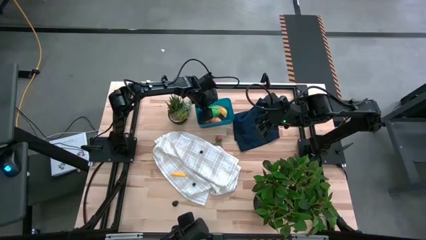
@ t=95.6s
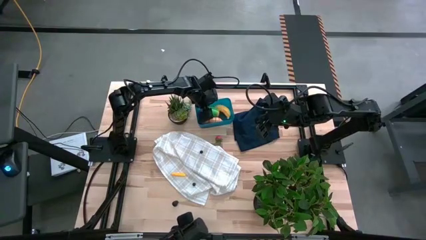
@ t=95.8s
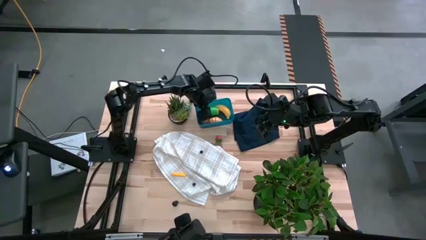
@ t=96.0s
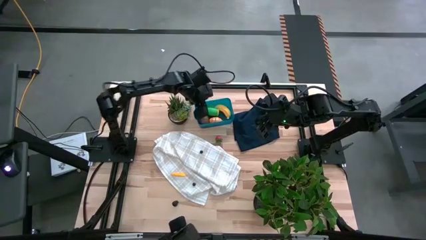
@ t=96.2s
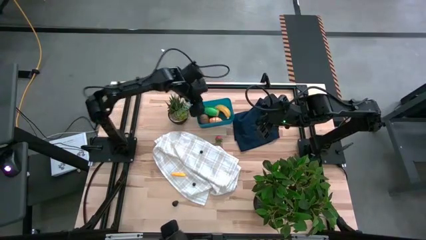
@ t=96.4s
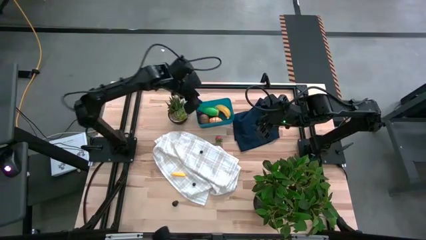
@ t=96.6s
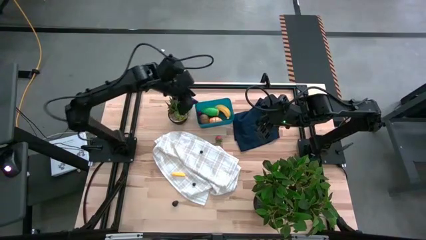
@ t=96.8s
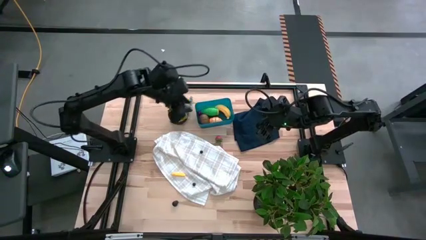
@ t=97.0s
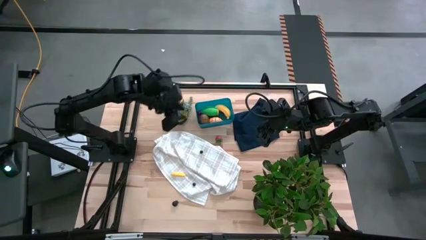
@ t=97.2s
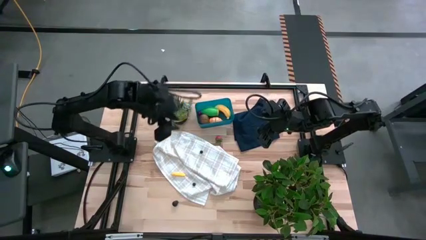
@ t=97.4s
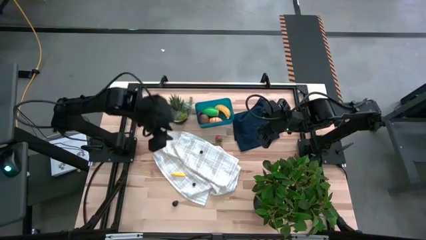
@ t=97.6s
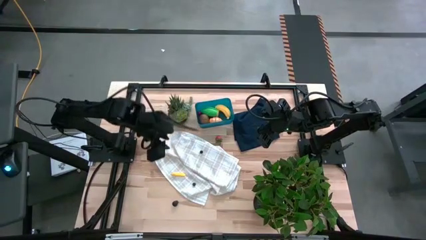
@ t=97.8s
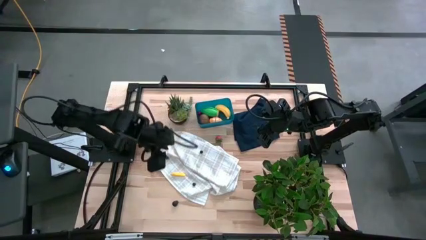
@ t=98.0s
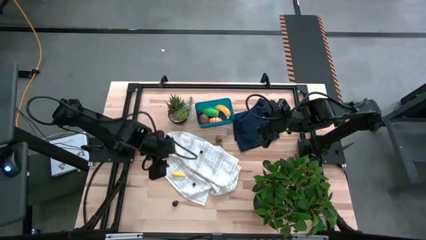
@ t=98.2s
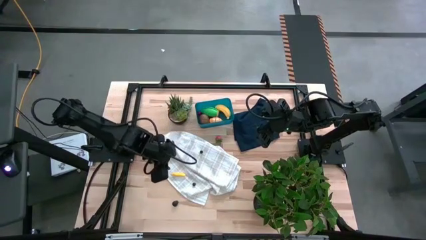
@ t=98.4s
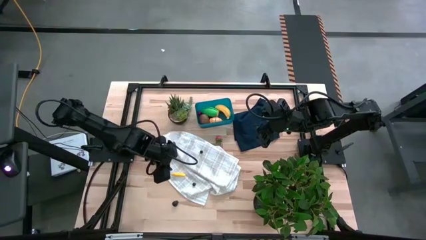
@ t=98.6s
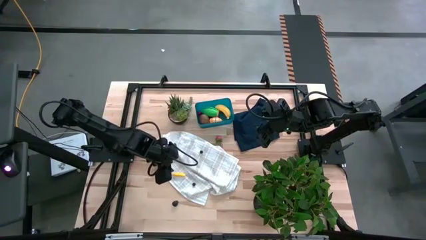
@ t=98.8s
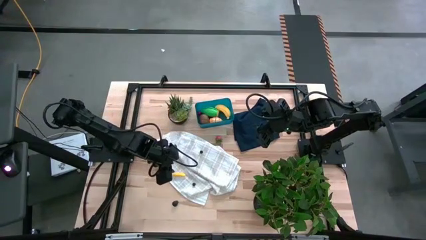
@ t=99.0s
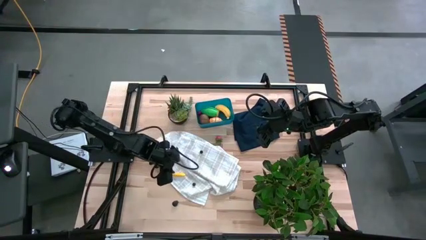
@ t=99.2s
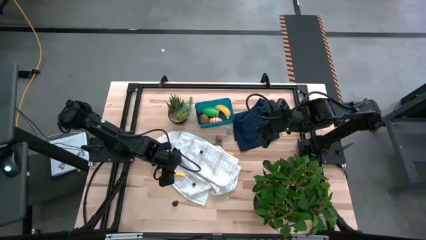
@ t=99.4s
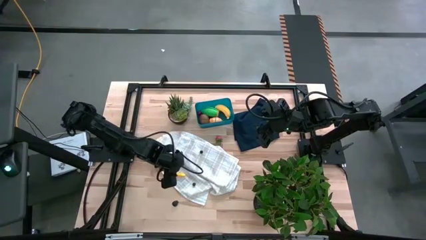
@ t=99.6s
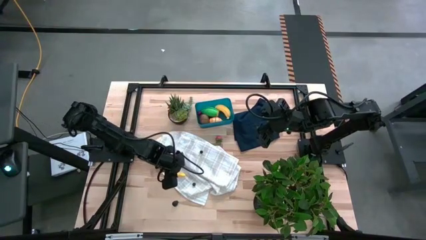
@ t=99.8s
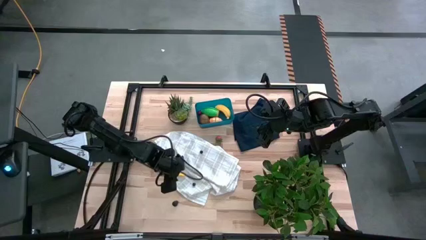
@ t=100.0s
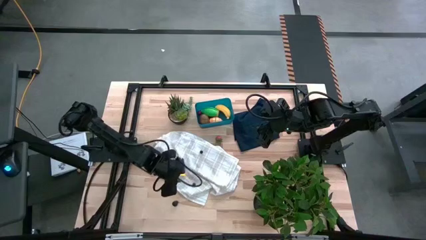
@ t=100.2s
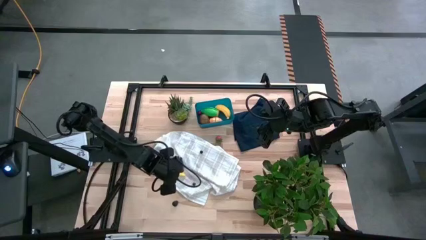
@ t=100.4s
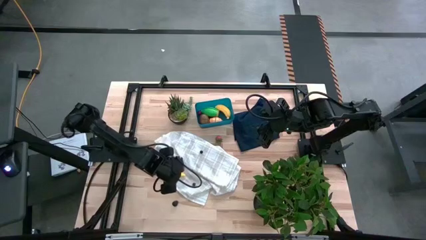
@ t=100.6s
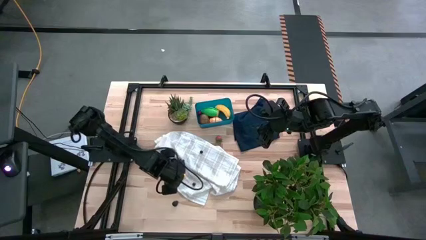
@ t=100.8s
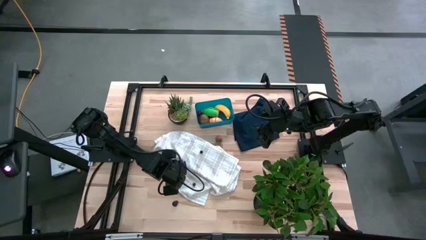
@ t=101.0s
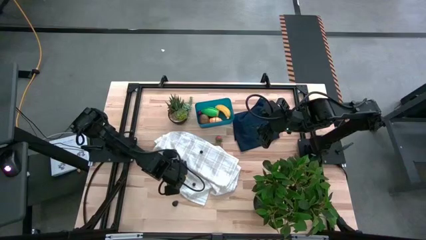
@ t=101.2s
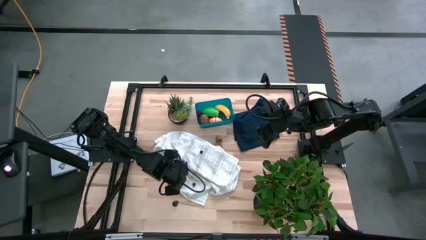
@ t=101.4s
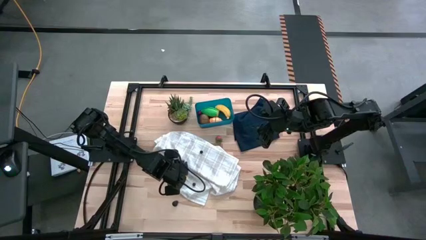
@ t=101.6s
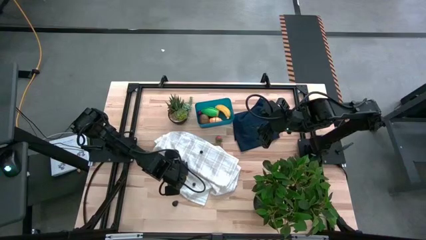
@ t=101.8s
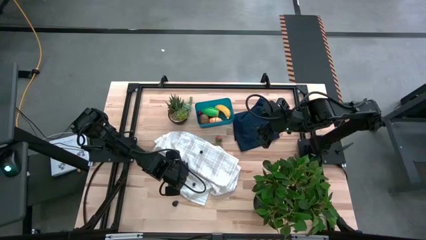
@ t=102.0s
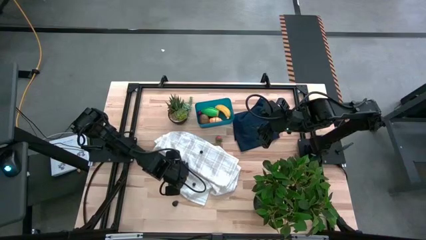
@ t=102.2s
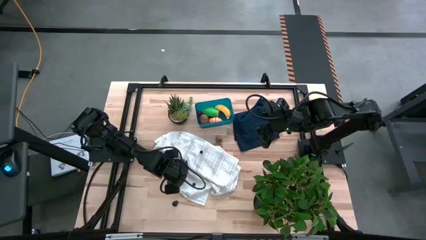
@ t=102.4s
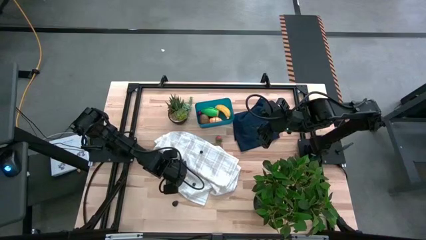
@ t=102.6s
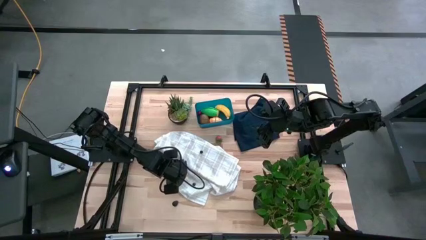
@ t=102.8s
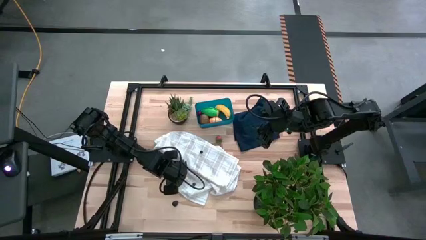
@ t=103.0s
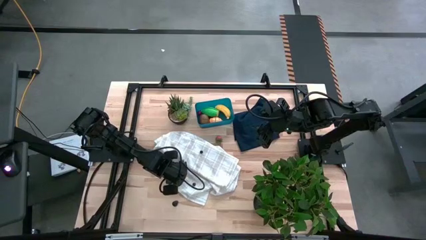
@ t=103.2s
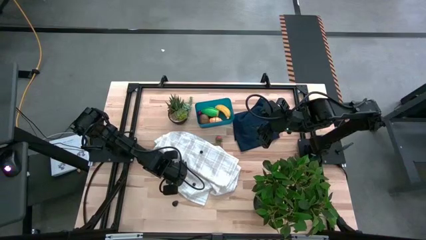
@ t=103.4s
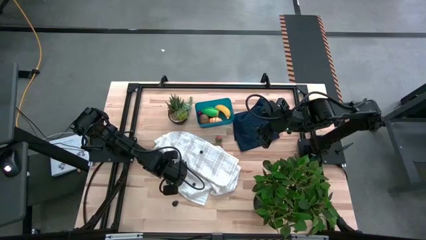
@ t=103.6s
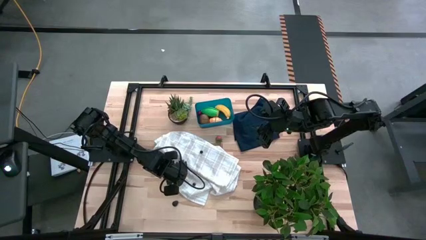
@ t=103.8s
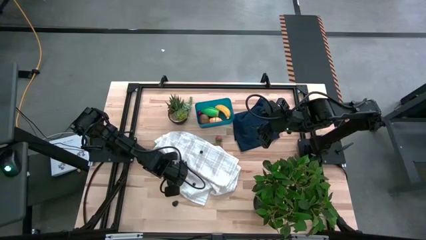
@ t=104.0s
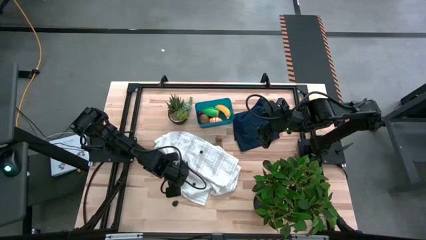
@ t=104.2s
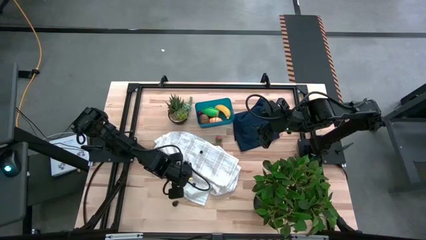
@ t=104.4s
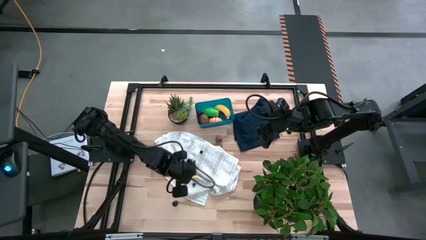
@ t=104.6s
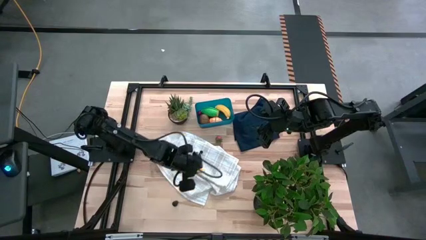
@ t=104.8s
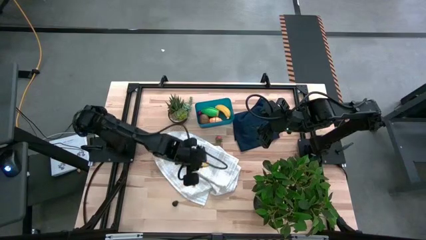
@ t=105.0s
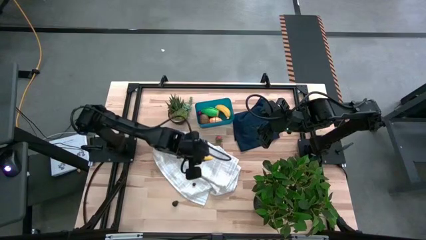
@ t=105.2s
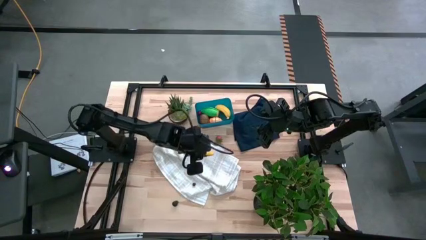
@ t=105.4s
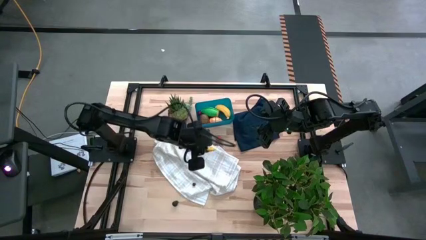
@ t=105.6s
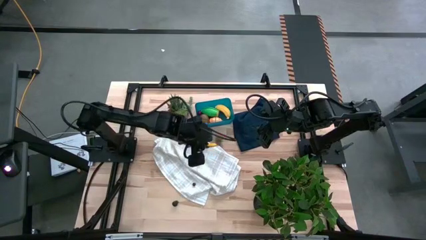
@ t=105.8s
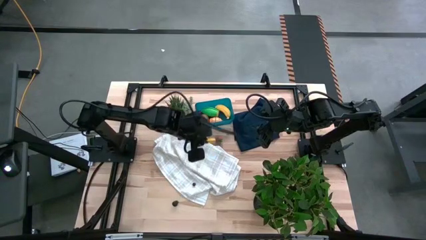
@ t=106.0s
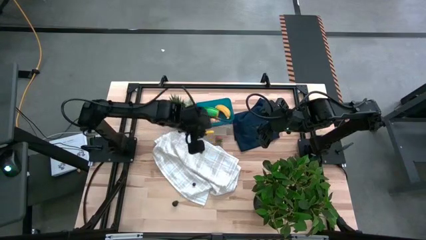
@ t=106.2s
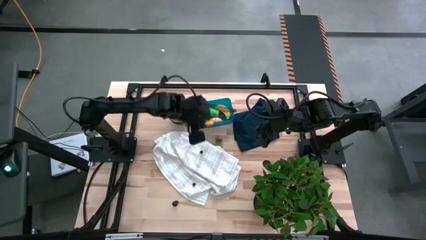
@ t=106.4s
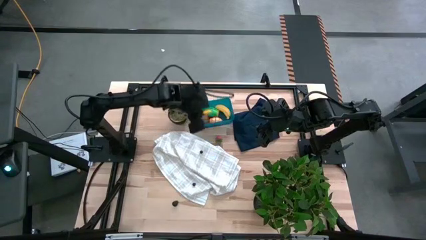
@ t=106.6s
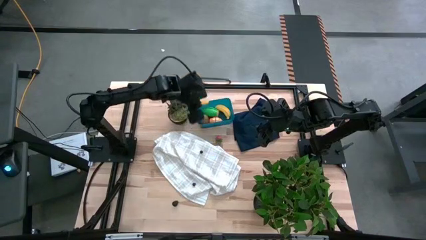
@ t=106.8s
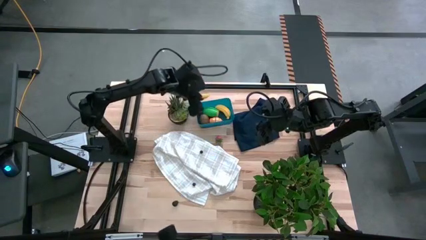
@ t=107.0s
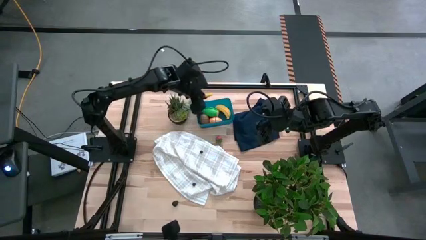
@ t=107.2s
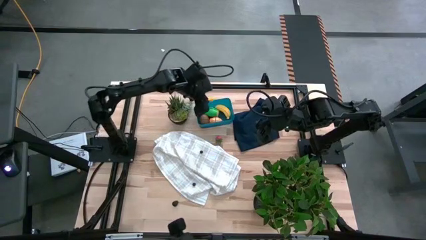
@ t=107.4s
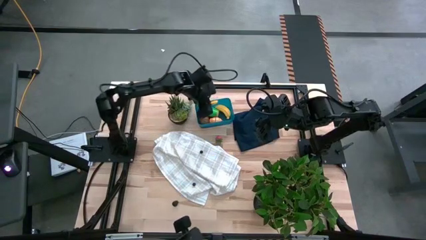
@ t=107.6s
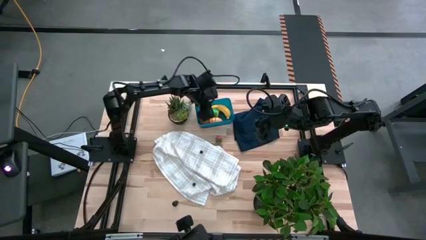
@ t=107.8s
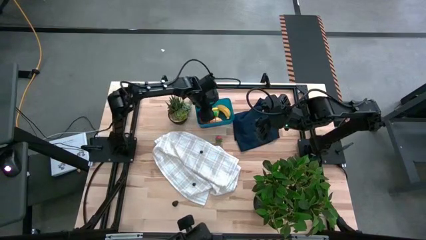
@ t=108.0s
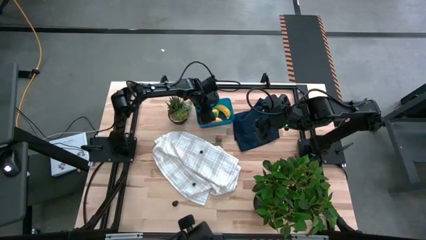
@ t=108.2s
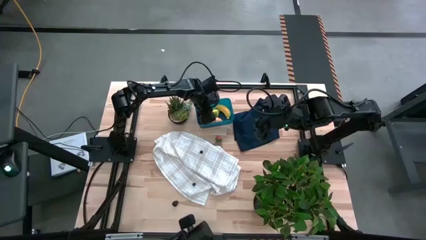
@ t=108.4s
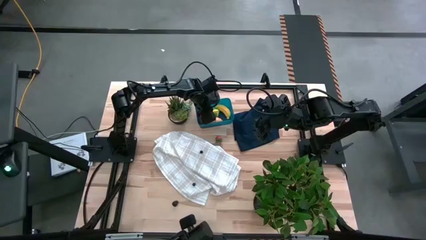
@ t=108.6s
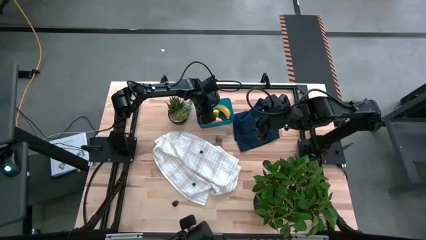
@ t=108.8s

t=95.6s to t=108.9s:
Task: Pick and placing Produce into tupperware
Put the yellow corn into the blue bin

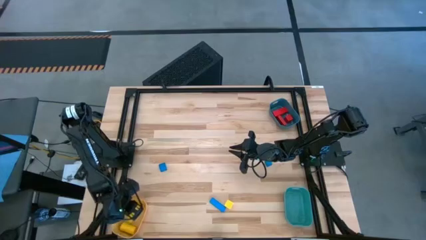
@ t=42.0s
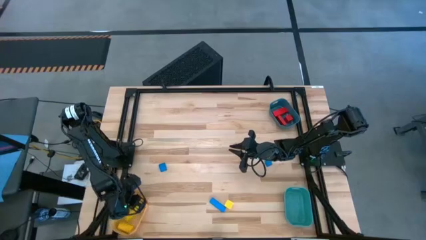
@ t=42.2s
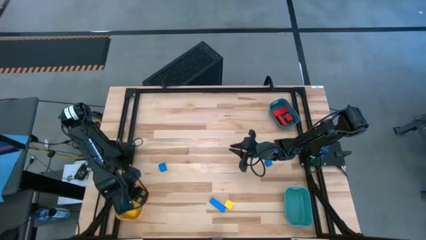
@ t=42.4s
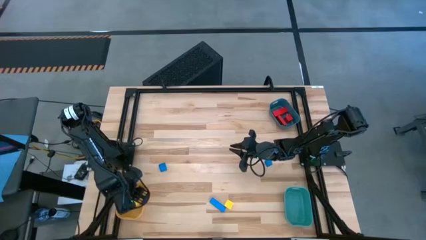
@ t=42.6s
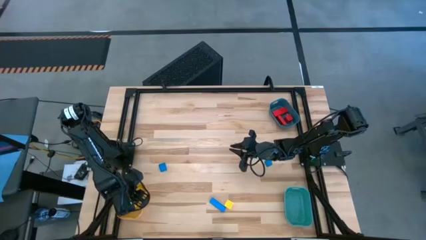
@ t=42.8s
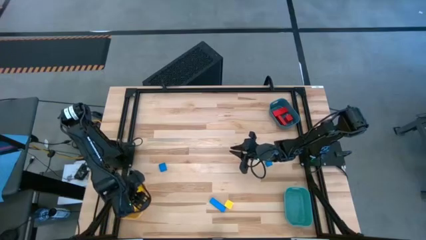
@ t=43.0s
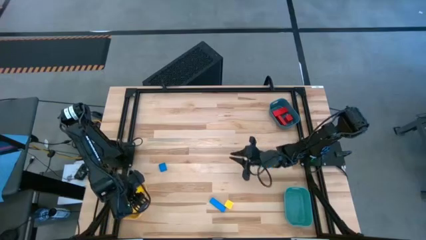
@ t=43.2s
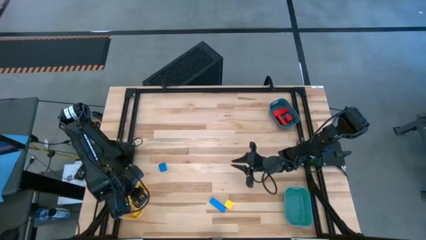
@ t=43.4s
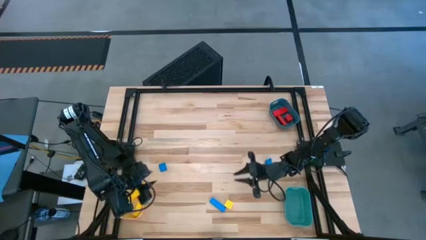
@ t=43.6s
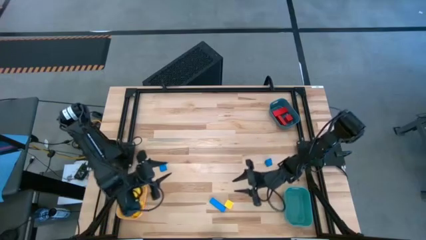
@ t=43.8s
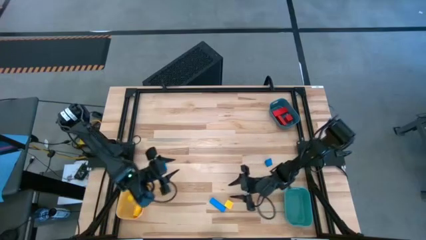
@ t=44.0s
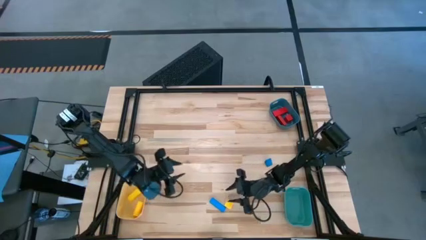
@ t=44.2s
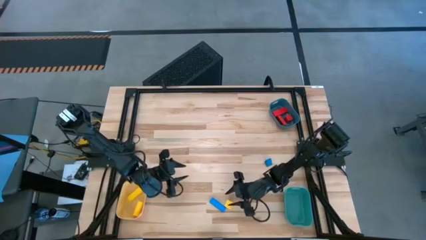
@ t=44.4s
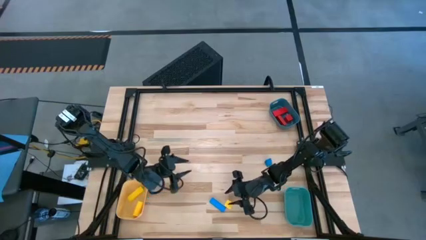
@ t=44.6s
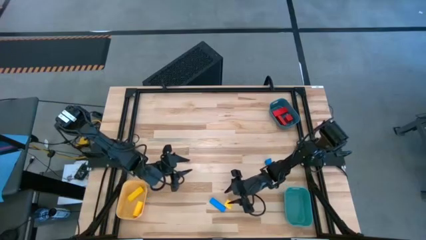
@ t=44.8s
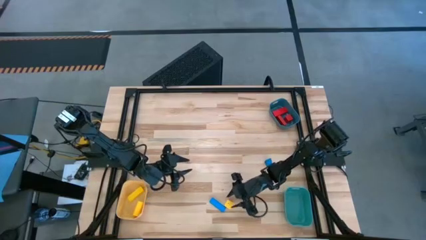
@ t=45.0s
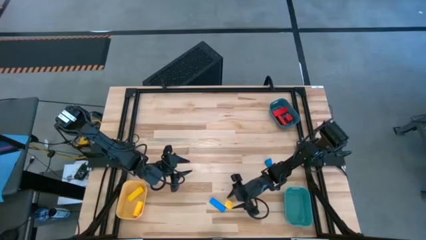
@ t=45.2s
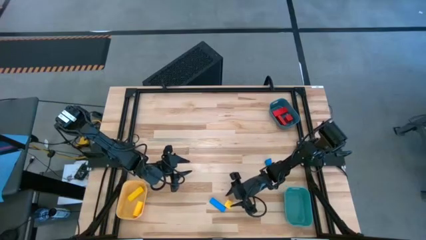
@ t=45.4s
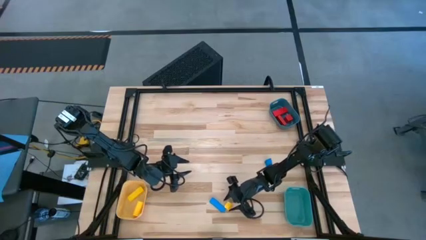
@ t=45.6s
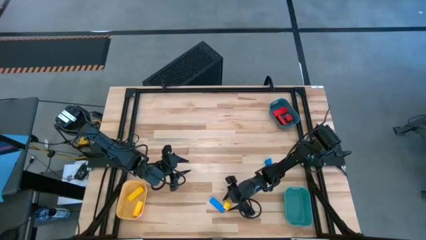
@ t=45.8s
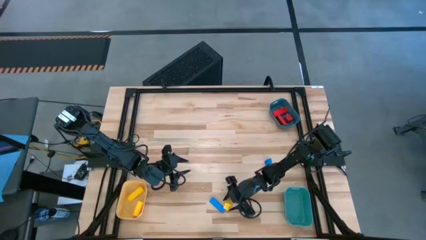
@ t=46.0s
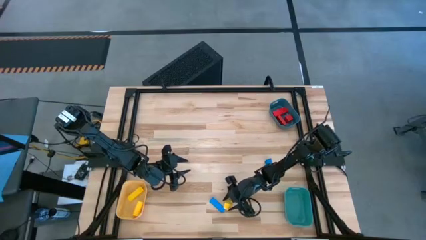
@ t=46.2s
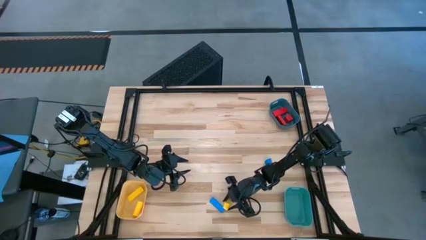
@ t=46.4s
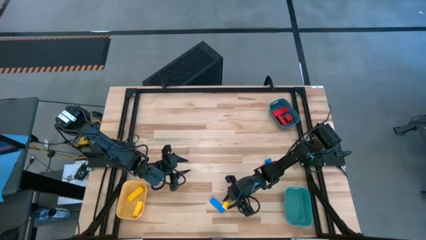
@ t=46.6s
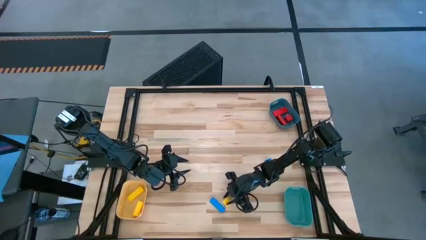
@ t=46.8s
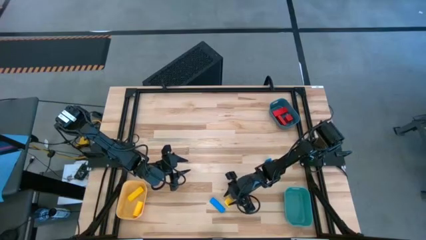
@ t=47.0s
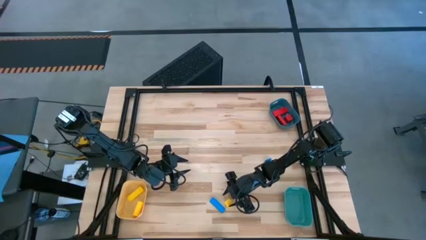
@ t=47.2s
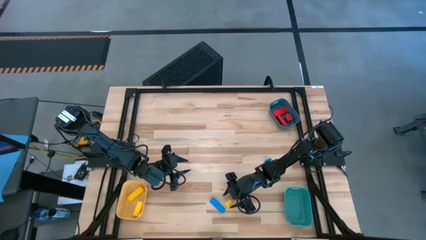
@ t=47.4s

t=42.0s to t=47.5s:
Task: Sort & place blocks by color
Put the yellow block into the yellow bin
